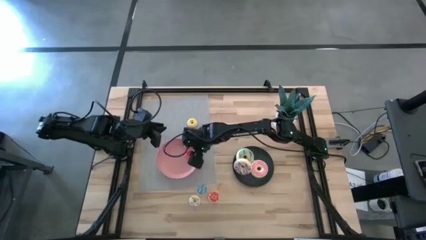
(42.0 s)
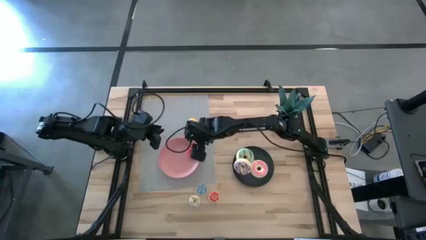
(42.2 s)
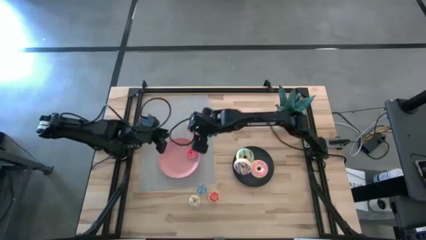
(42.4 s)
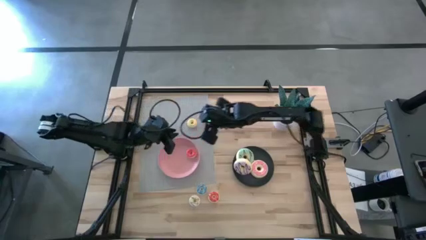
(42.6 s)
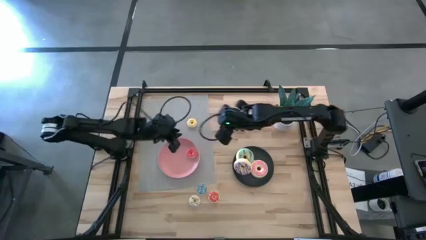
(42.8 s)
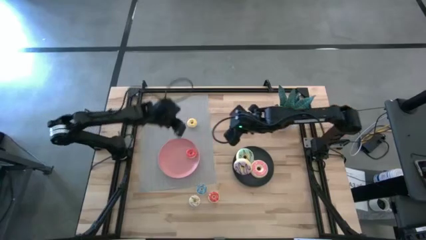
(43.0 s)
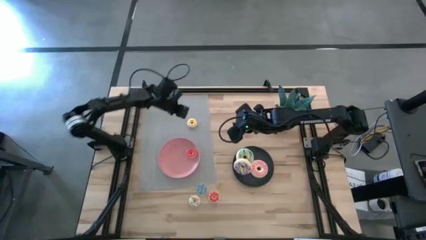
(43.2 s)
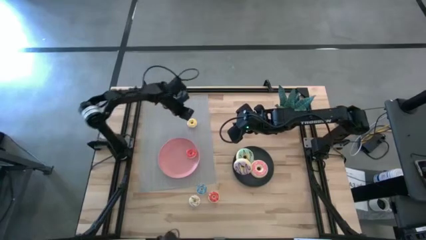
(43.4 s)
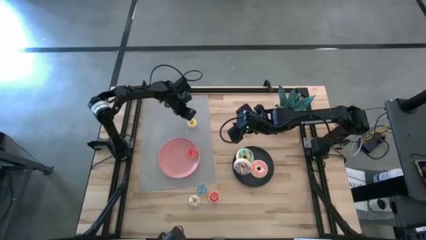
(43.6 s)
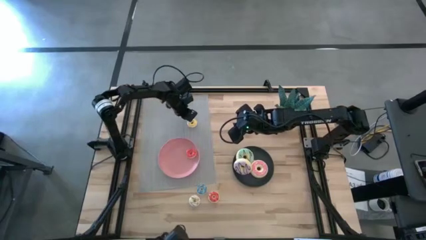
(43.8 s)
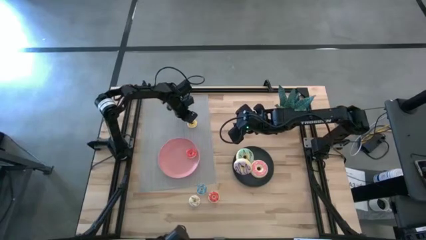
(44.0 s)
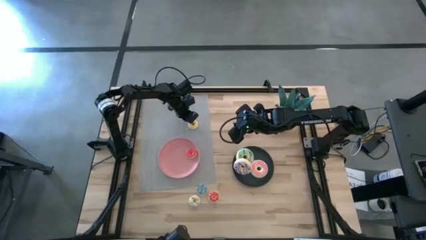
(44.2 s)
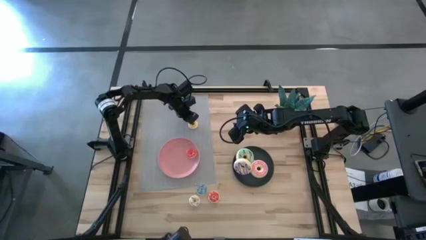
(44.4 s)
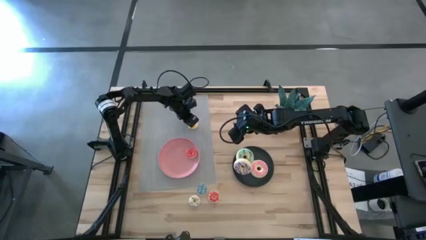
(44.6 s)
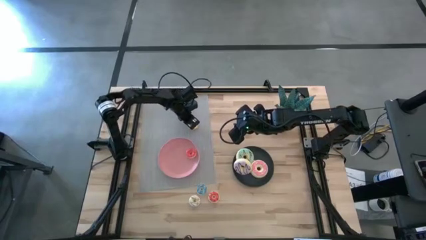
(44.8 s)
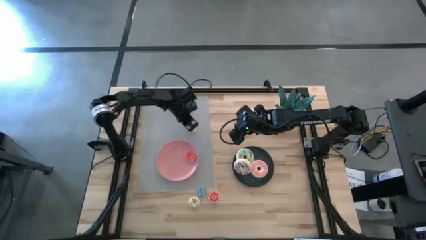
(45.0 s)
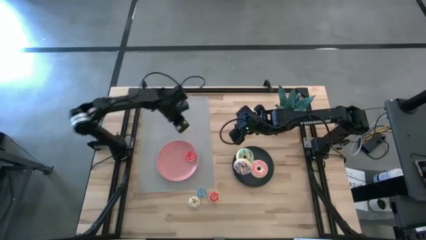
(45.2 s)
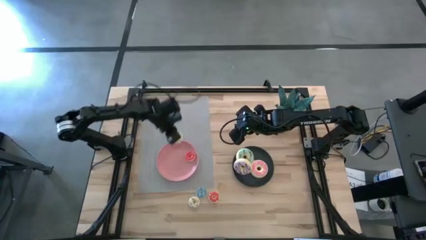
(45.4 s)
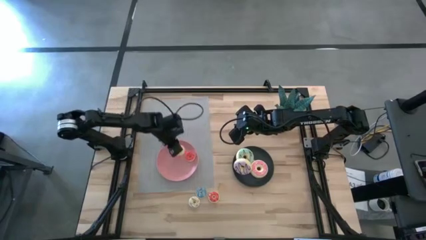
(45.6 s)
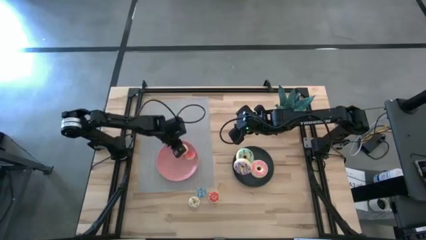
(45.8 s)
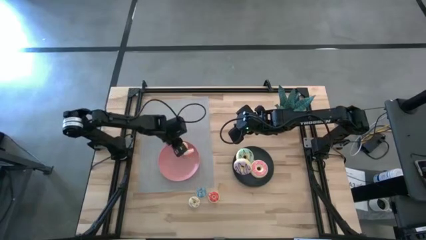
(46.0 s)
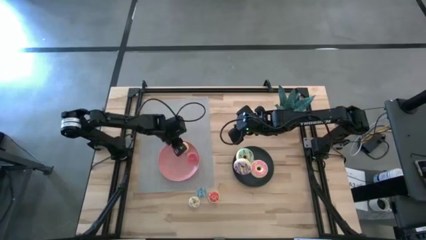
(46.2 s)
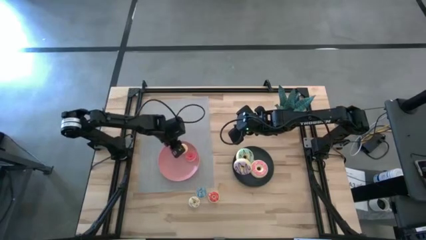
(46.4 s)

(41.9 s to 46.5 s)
Task: Pick & Place donuts
Put the small yellow donut on the pink plate

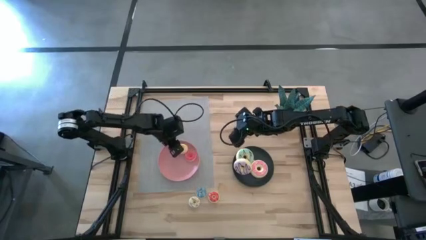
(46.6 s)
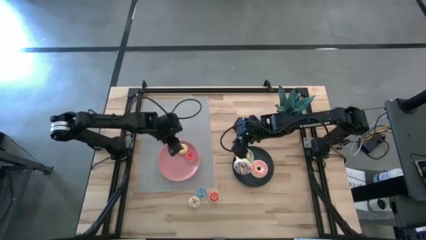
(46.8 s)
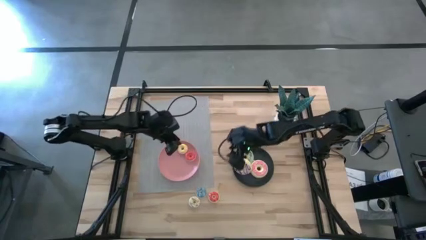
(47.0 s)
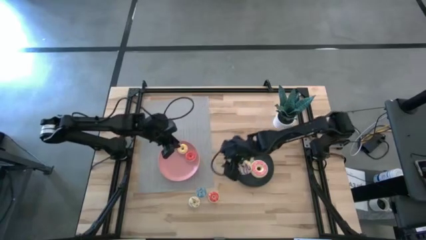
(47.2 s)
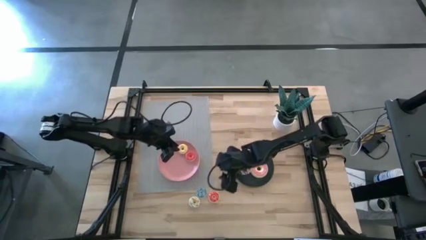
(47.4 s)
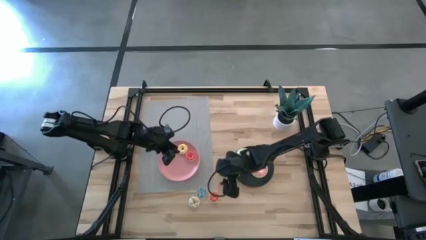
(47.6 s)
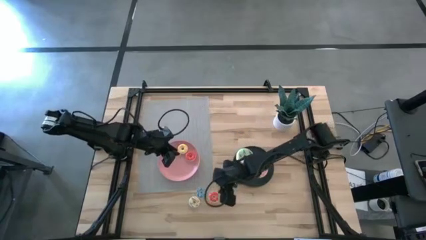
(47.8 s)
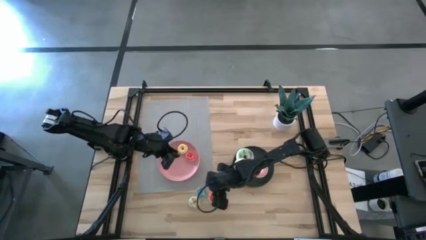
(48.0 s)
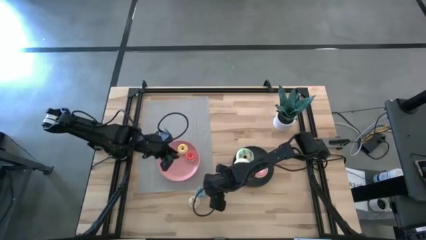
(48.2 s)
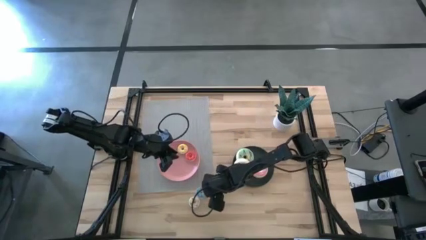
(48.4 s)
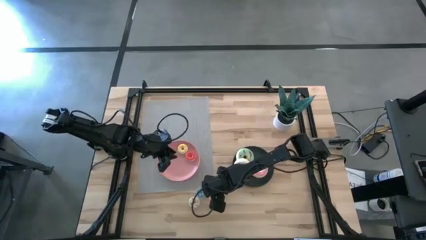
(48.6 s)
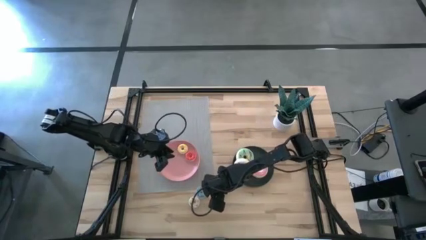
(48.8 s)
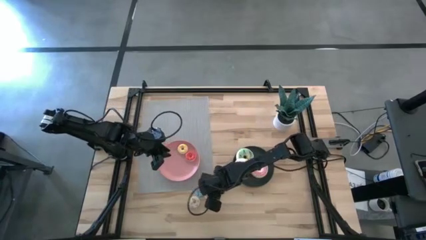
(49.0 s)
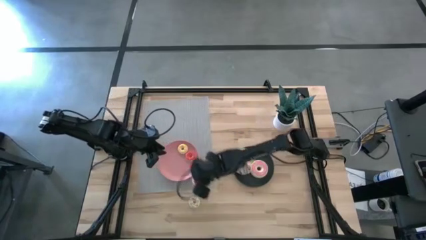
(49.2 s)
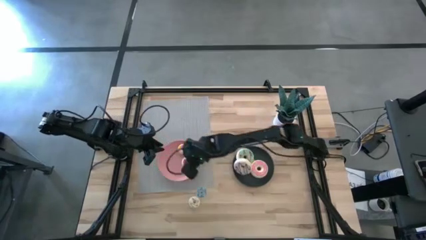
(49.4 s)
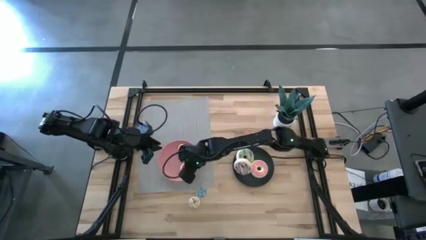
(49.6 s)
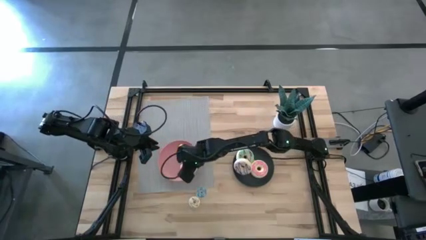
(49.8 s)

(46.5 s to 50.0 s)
Put the small orange donut on the pink plate

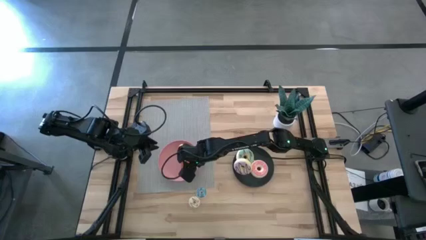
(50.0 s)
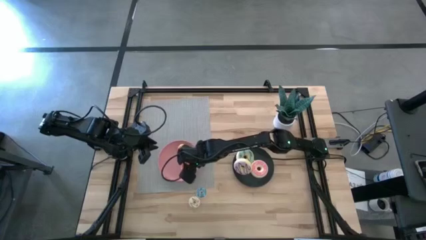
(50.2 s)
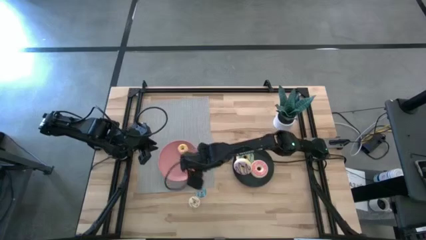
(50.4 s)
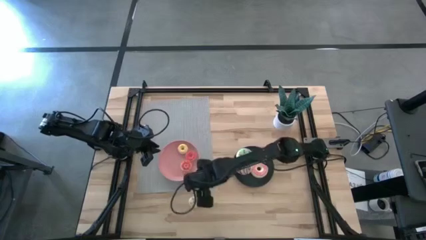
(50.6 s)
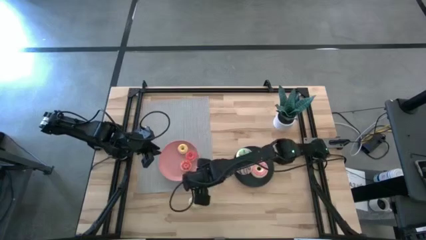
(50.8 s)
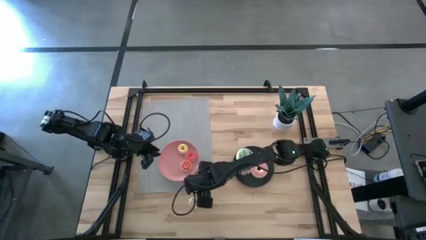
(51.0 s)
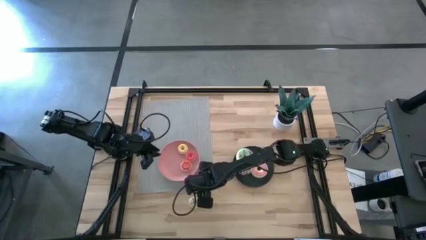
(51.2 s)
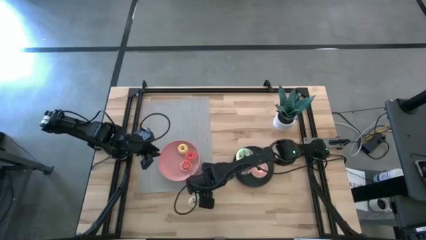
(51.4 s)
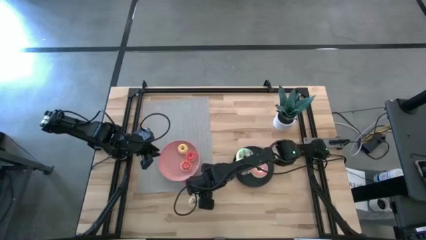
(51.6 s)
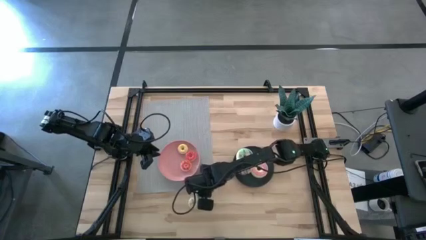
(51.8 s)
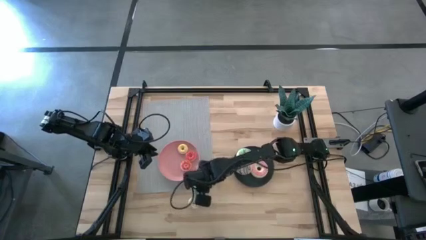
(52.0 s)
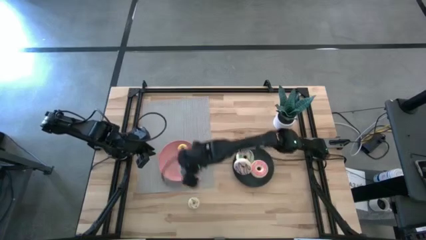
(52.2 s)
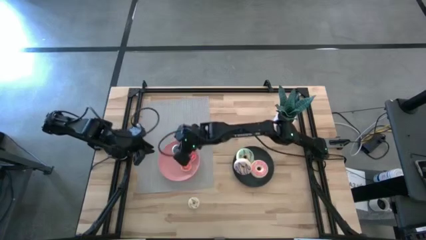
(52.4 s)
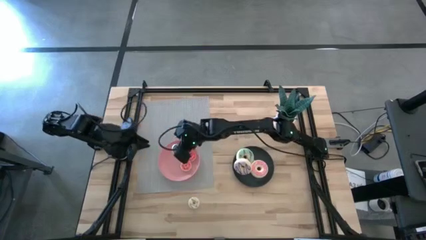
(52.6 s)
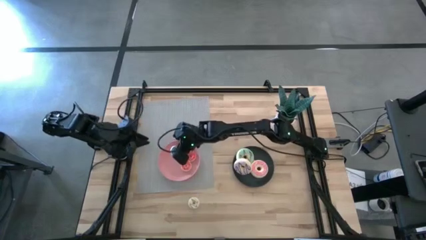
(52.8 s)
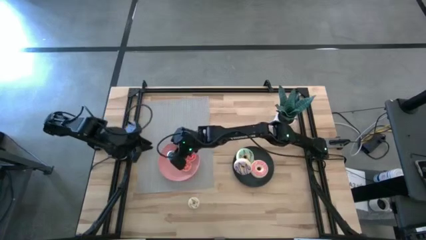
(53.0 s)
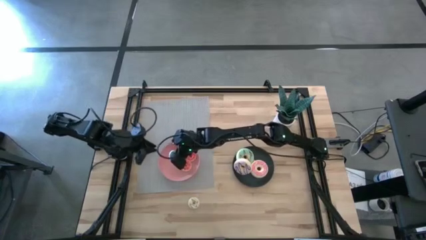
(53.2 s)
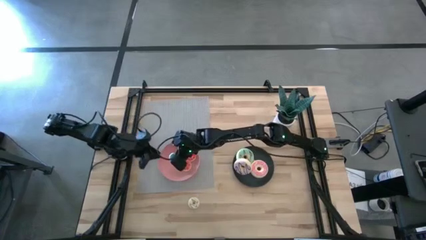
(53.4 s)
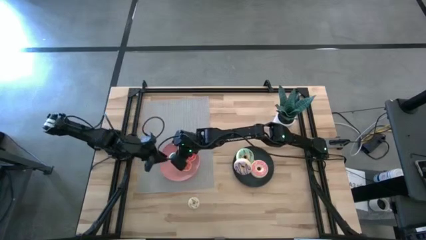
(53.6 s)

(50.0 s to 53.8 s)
Put the small light blue donut on the pink plate

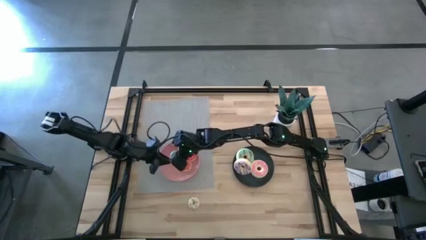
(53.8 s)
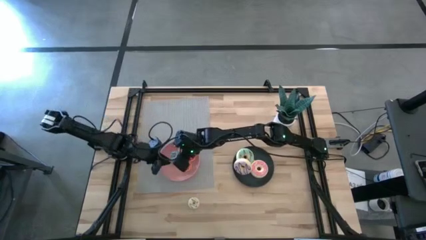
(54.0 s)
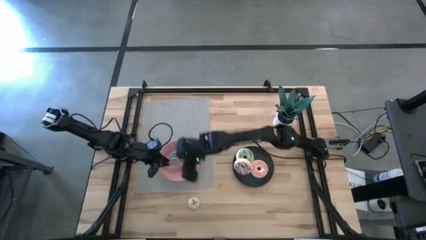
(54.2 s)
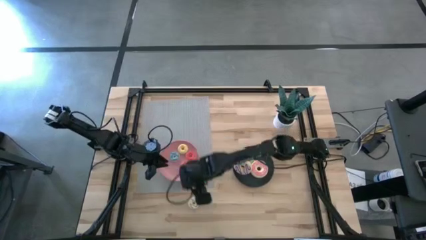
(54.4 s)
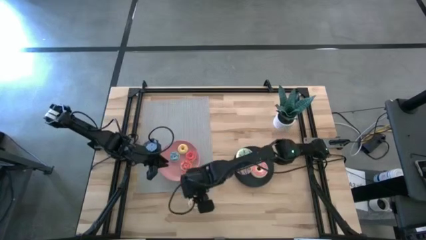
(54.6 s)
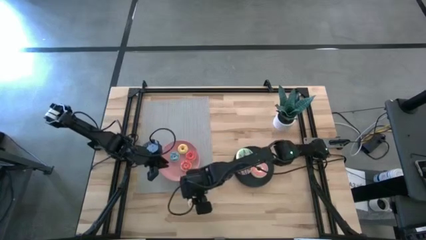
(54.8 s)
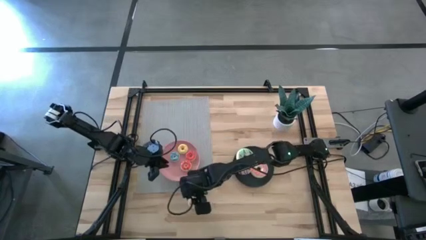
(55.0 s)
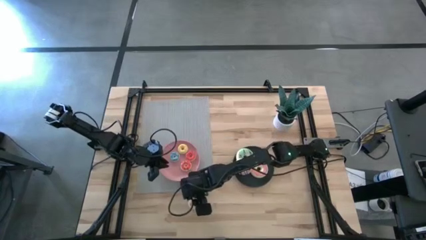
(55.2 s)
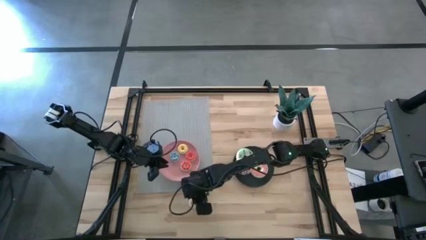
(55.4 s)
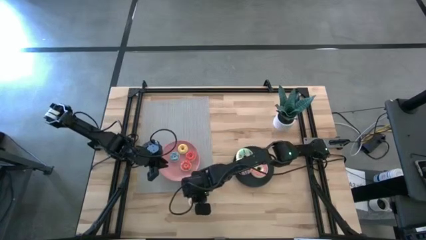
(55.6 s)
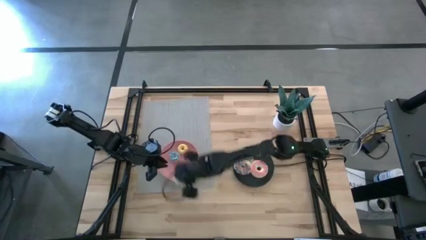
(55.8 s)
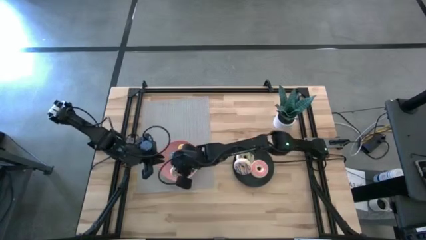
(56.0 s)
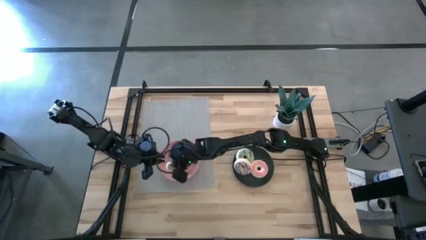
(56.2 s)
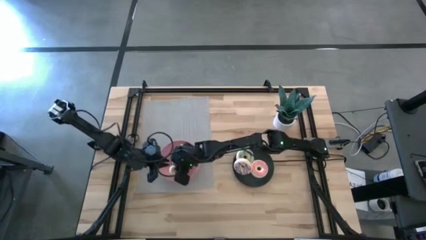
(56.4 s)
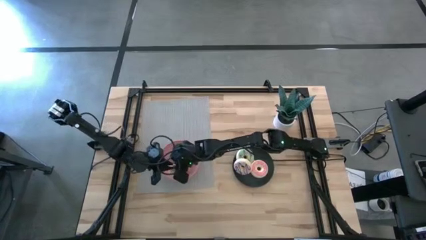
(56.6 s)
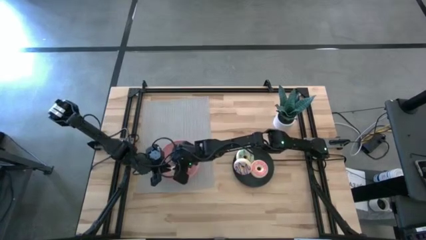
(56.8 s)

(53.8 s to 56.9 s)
Put the small white donut on the pink plate

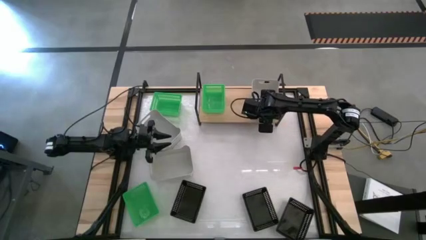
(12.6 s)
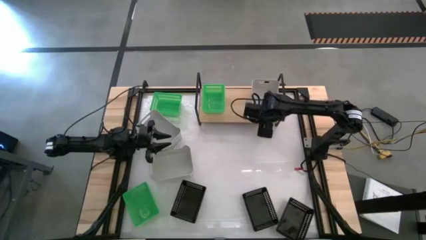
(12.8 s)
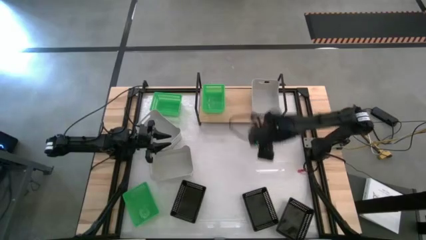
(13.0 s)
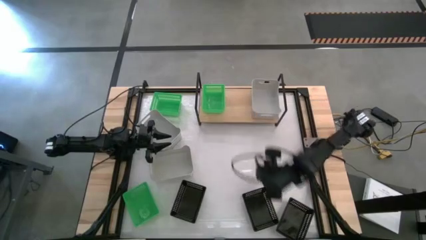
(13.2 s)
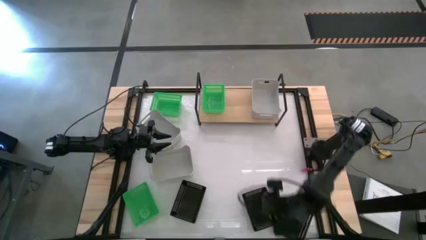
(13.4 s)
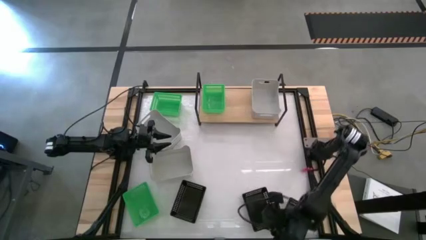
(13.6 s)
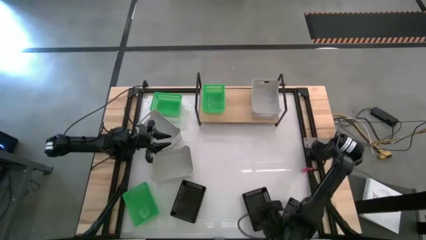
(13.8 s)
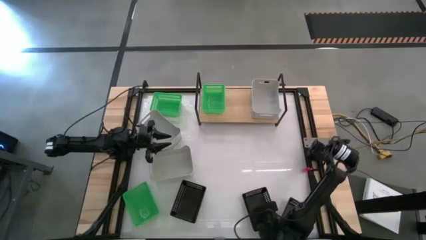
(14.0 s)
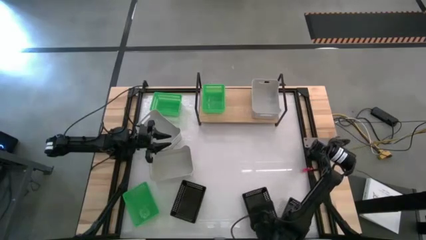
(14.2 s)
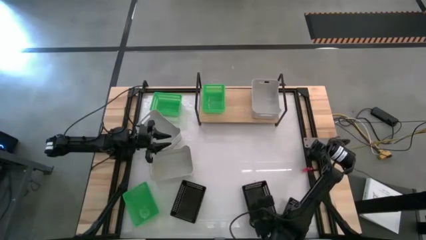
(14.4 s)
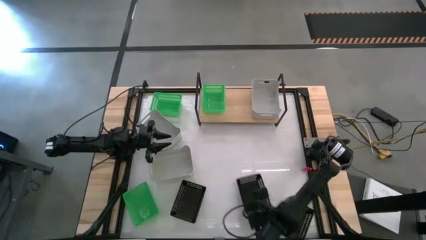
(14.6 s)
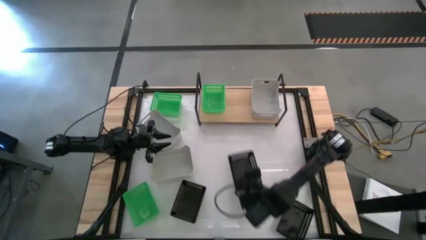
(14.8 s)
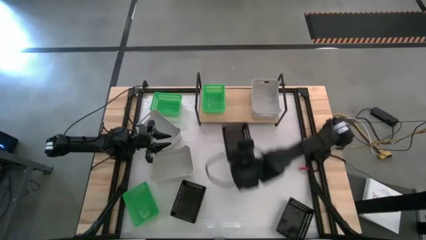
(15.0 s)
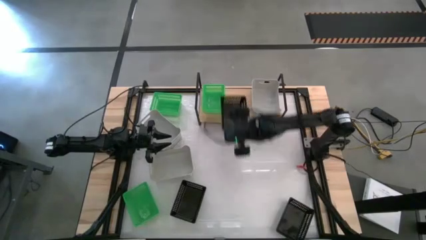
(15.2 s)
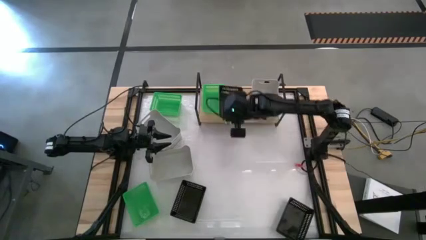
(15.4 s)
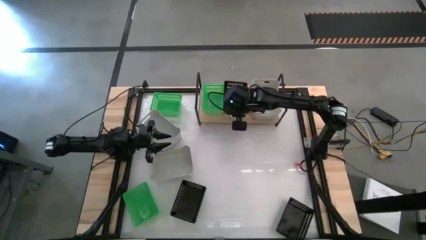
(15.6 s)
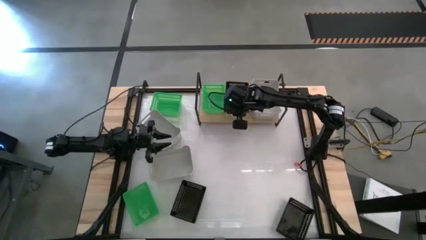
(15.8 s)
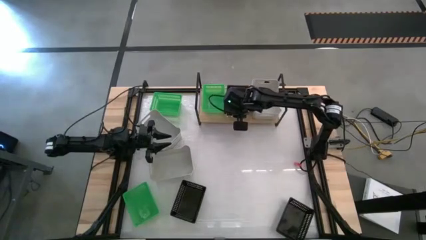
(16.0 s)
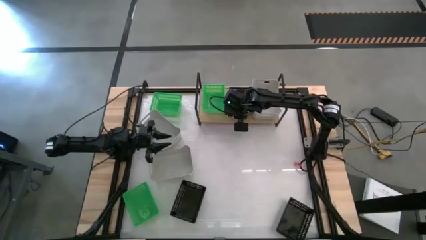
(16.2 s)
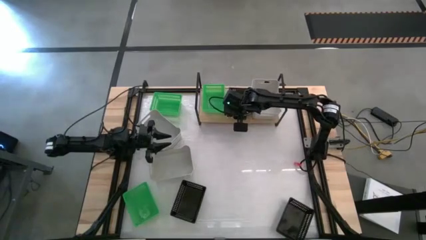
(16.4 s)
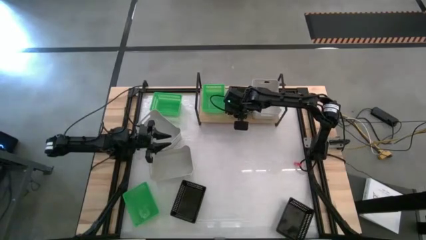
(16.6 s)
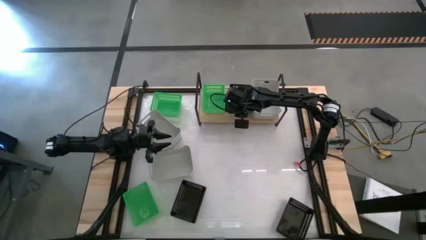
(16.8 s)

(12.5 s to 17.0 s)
Task: Stack baskets on shelf by color
Put the middle black bin on the shelf
